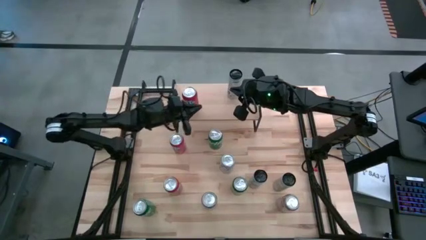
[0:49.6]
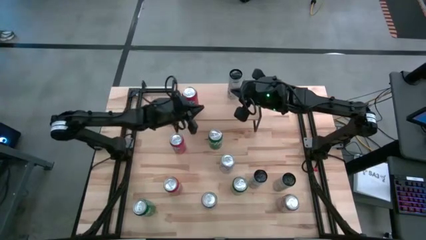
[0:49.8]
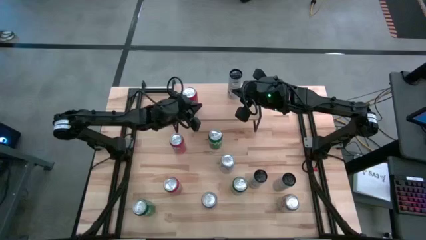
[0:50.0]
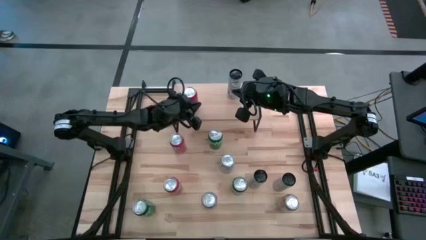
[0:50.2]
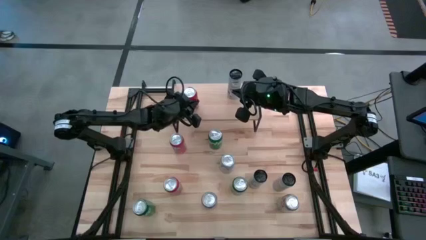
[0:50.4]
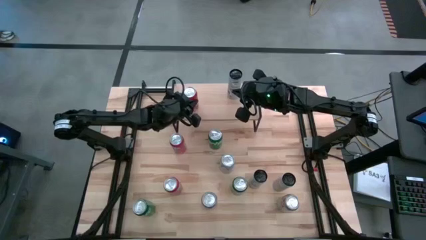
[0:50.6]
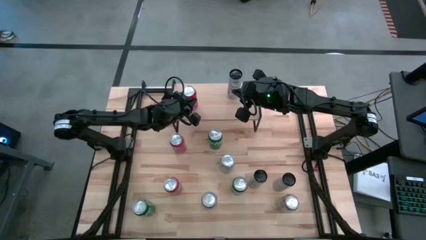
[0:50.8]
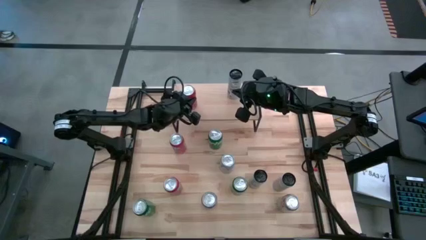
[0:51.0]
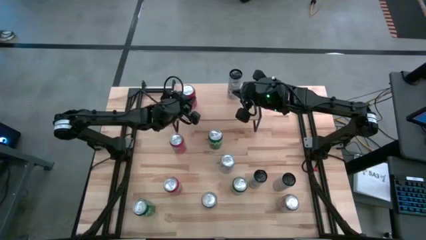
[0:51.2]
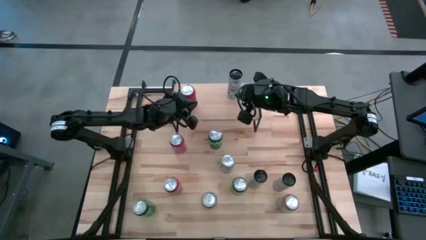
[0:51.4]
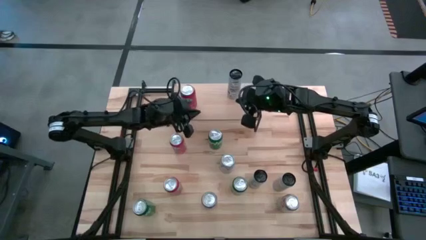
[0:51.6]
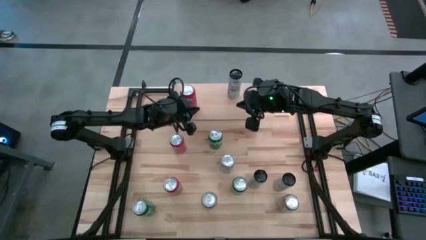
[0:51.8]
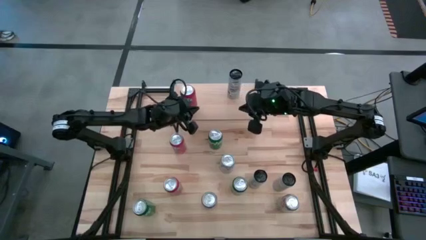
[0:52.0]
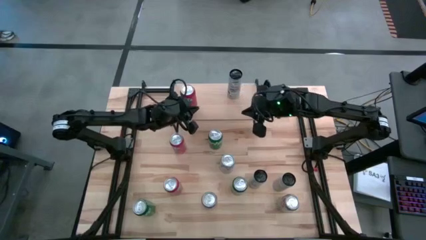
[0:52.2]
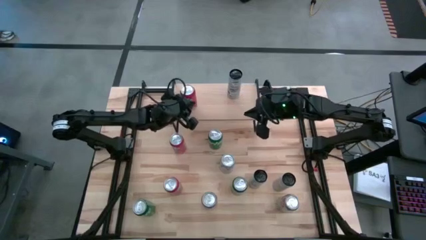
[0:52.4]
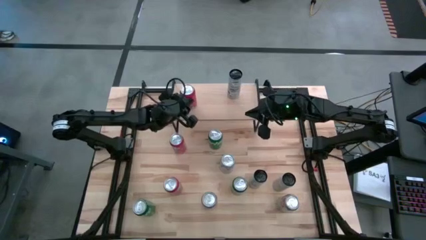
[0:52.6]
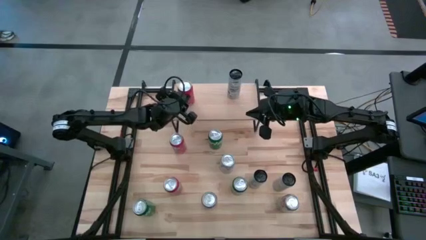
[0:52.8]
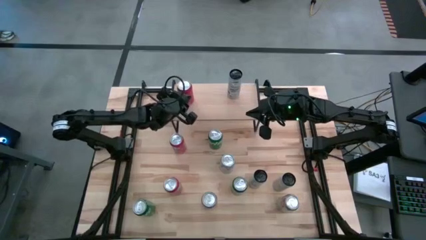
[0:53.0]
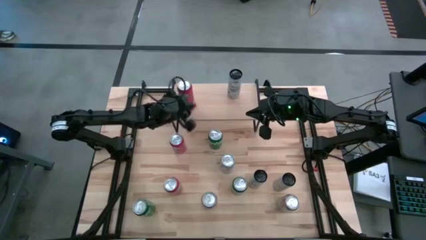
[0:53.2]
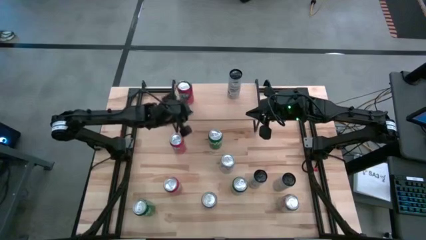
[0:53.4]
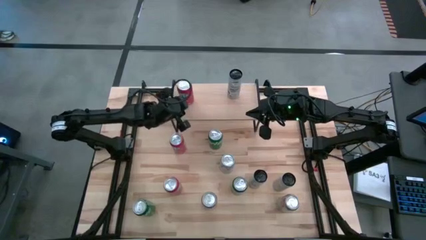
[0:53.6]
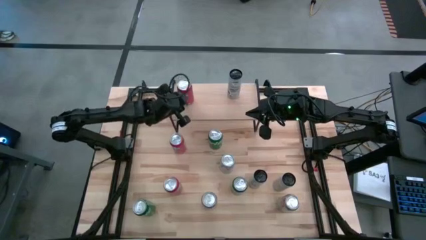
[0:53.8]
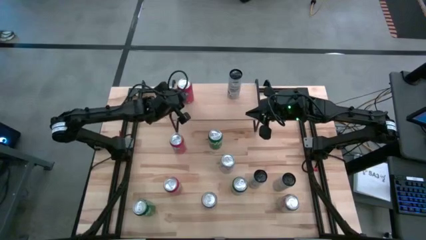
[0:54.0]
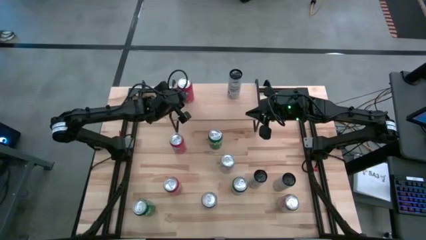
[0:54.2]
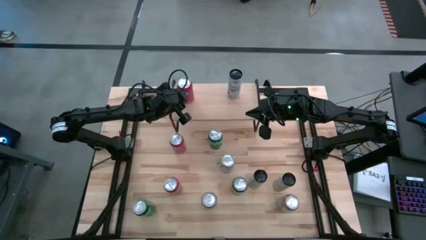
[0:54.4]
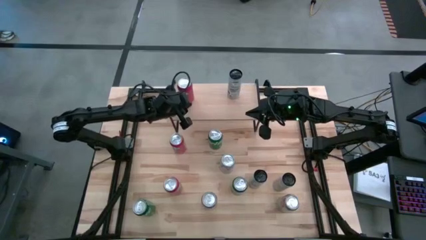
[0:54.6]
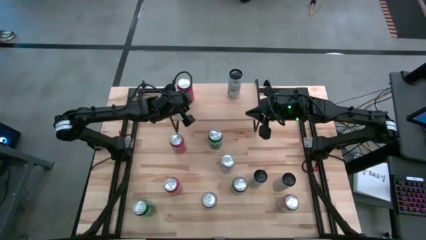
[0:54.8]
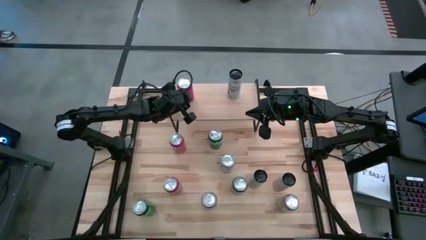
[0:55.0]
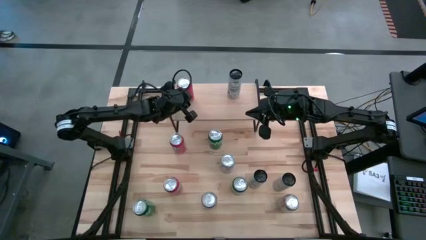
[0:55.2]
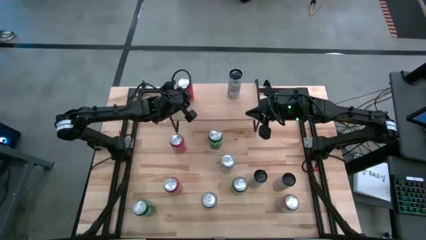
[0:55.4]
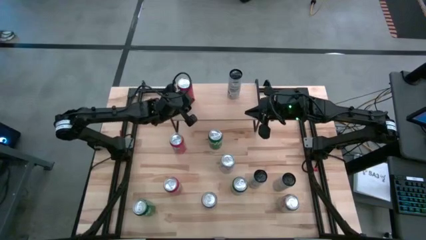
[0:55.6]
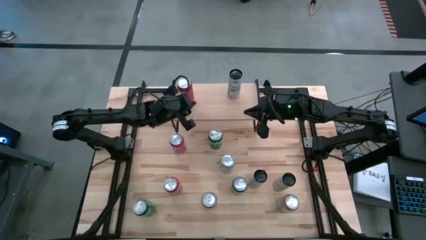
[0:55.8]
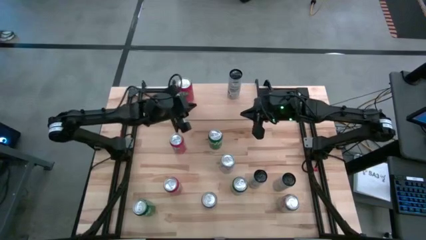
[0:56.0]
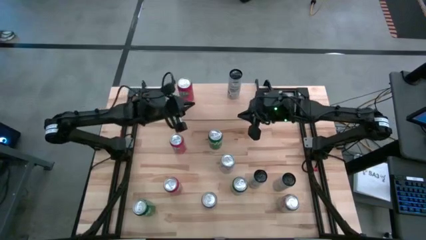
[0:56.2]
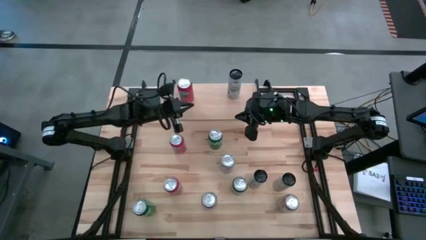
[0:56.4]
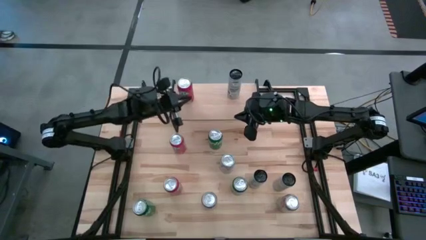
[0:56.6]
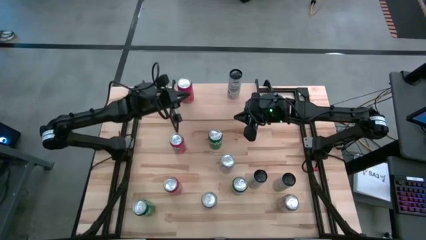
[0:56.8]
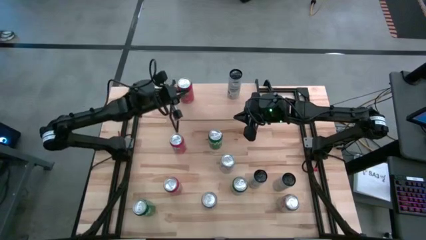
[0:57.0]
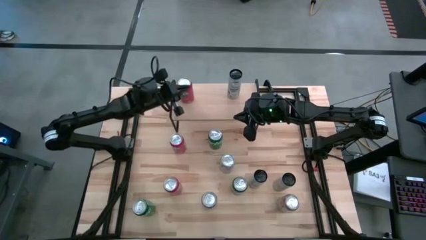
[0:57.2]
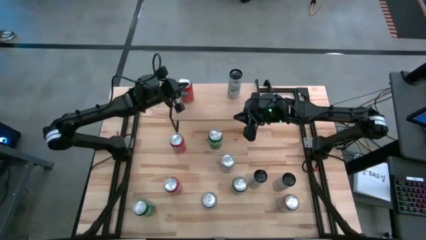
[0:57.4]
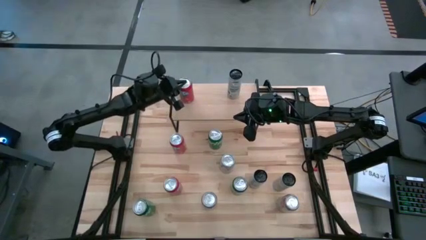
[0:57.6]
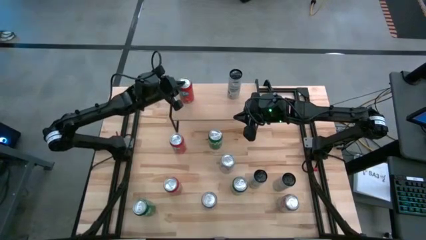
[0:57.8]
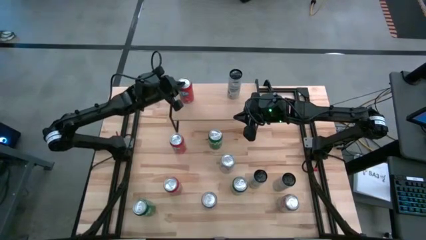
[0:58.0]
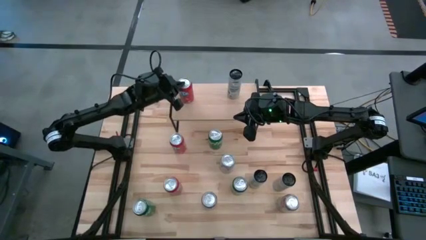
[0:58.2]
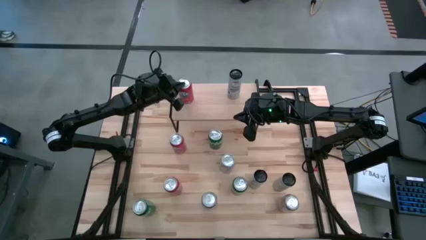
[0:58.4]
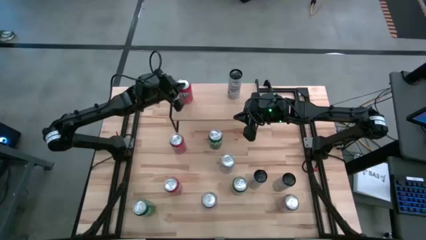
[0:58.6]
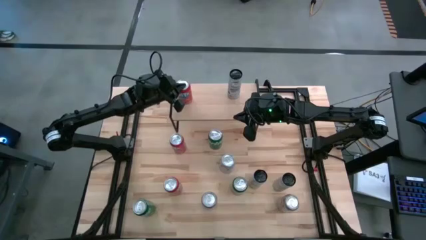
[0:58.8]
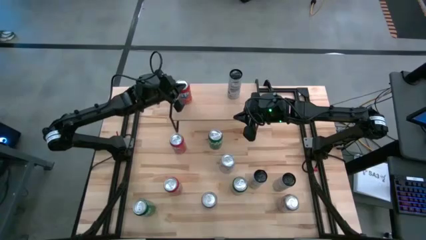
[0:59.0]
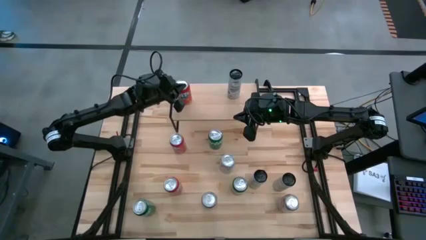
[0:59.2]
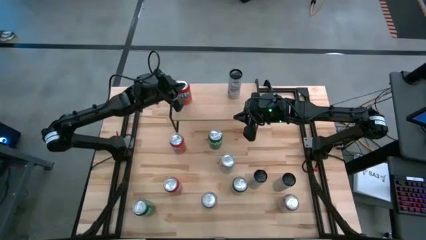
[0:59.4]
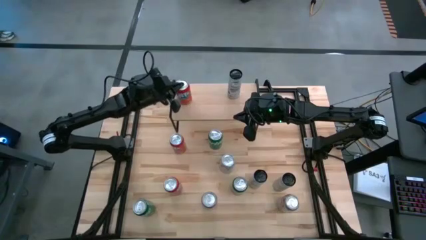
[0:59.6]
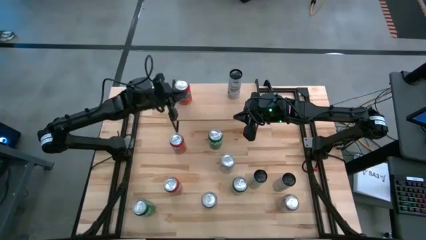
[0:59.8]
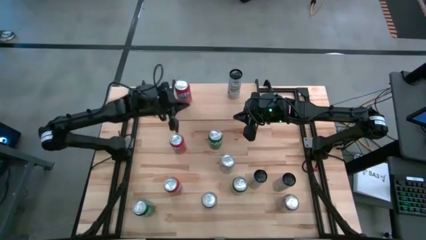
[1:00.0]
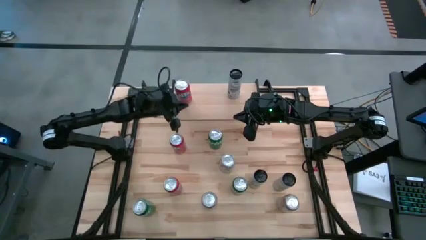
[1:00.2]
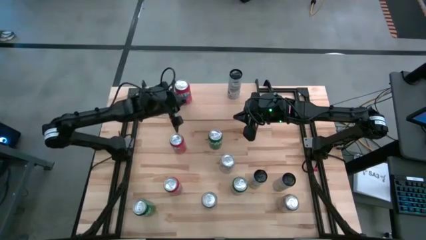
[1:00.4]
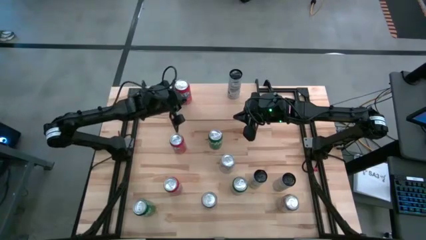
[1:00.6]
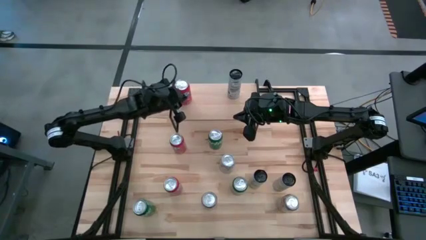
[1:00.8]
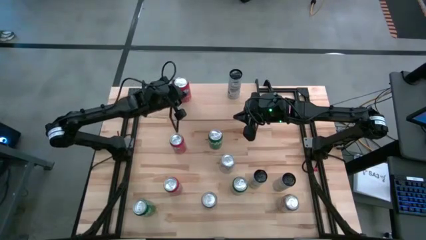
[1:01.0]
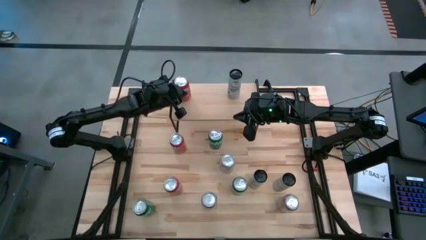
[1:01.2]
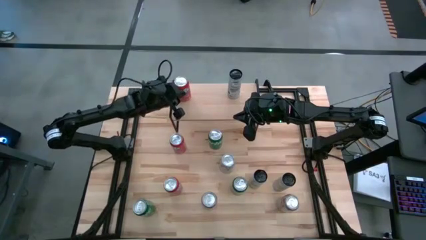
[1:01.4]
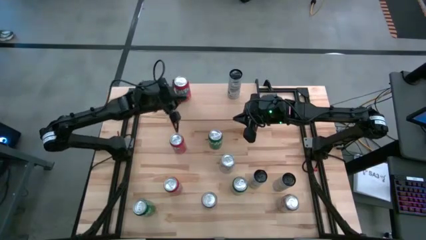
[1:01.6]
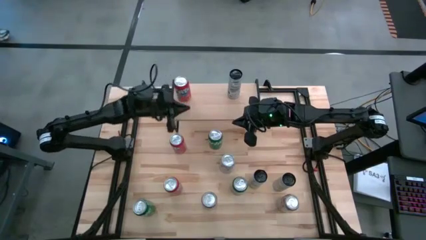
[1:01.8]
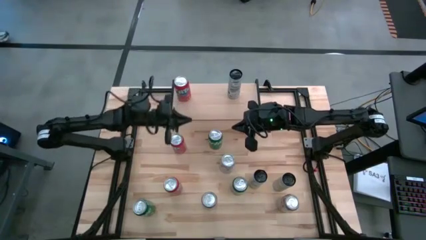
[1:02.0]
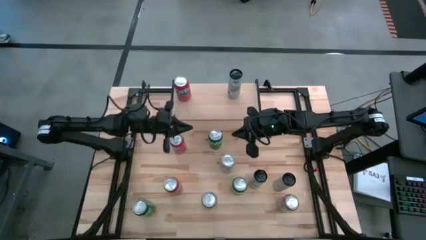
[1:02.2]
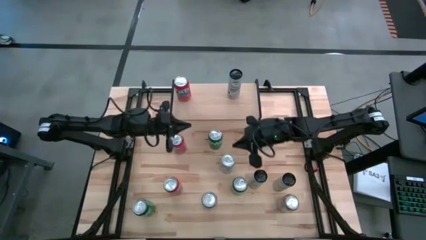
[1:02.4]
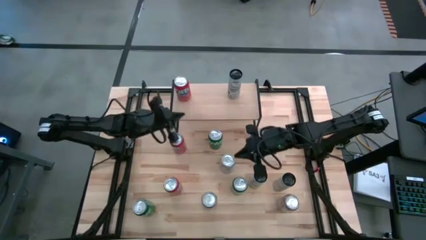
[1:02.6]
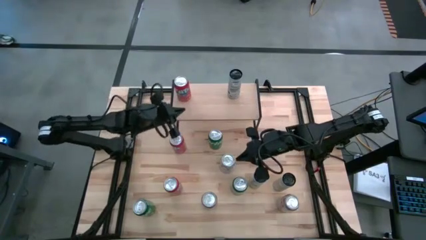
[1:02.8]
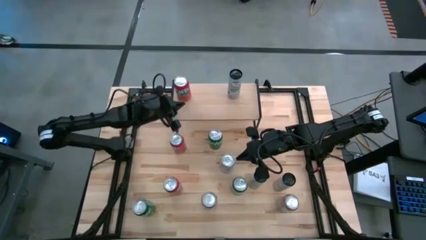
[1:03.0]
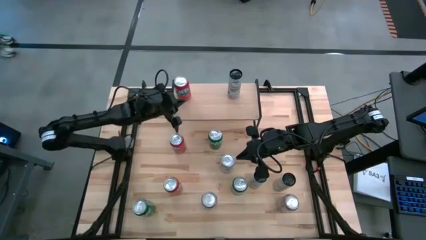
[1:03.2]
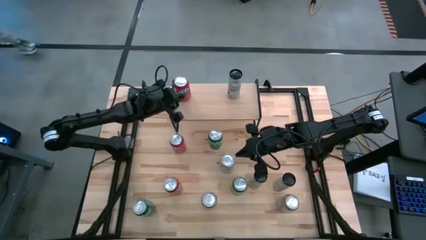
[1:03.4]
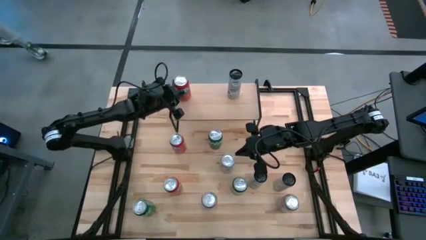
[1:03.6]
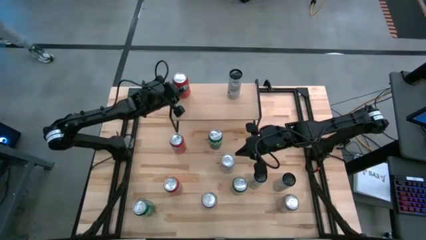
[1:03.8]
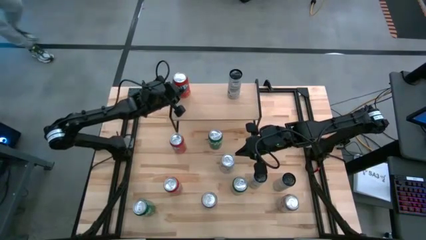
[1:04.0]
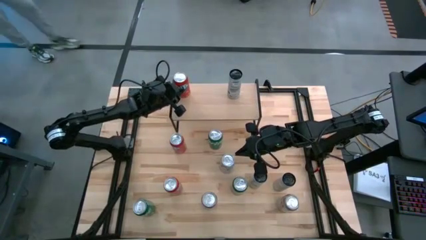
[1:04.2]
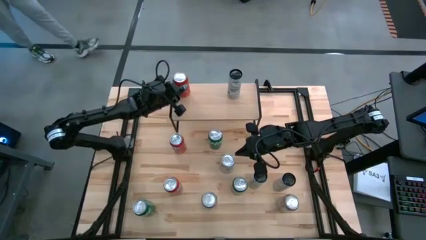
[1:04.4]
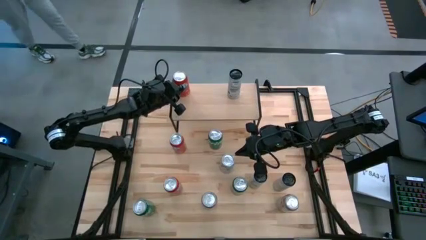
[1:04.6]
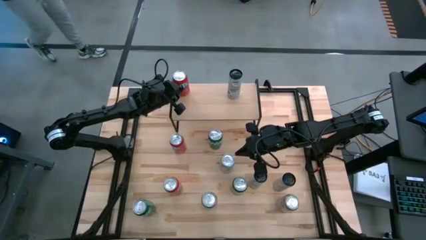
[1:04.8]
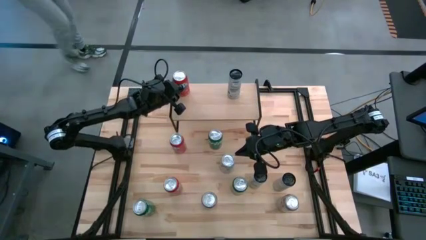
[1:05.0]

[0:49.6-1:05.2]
Task: Place canned beverage on shelf
Put the center orange soda can on the shelf
